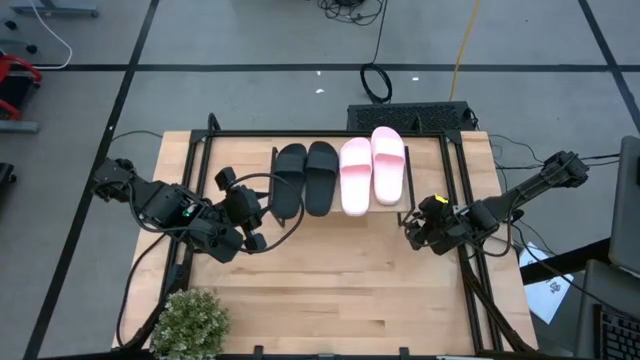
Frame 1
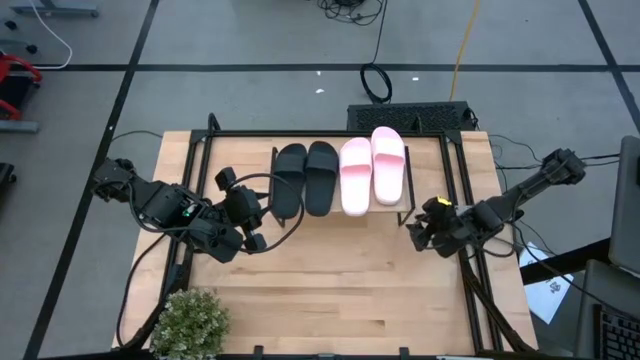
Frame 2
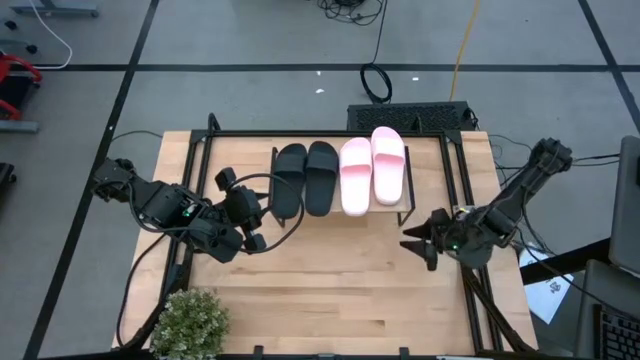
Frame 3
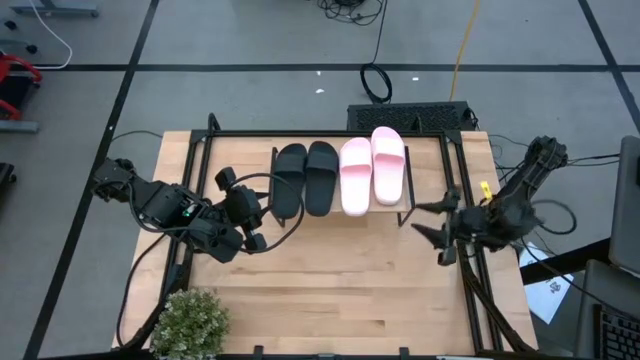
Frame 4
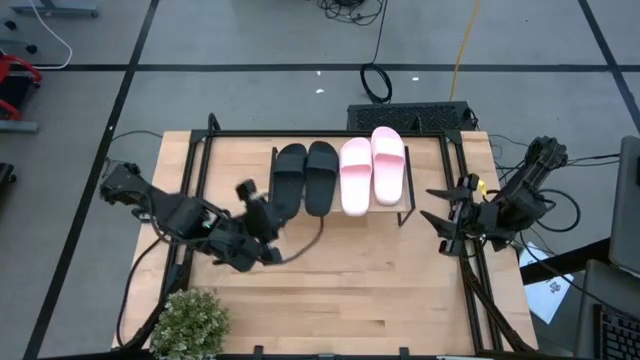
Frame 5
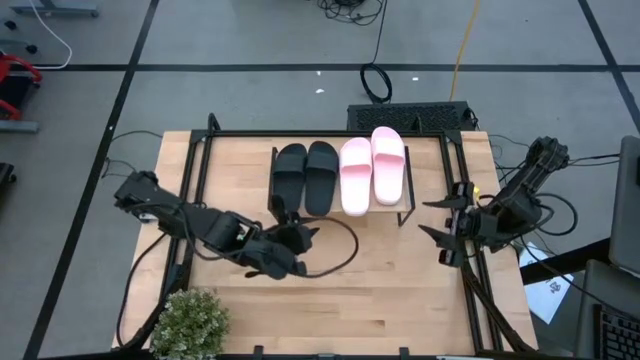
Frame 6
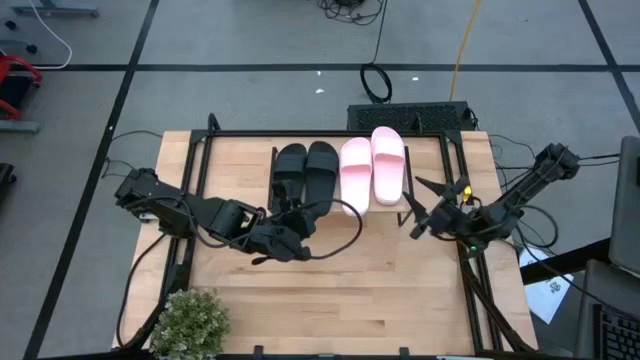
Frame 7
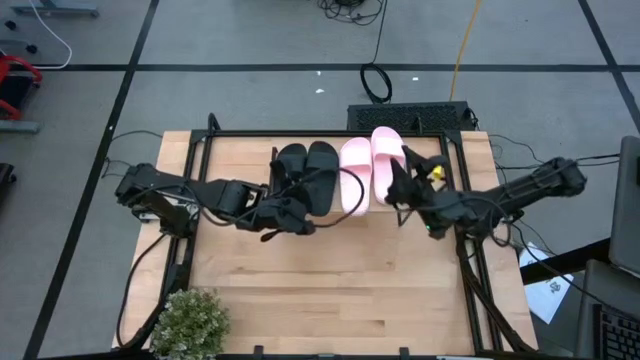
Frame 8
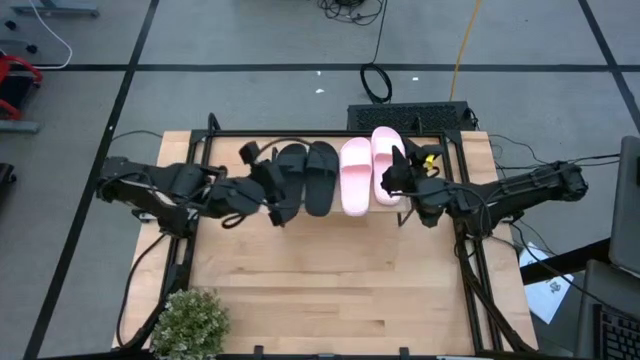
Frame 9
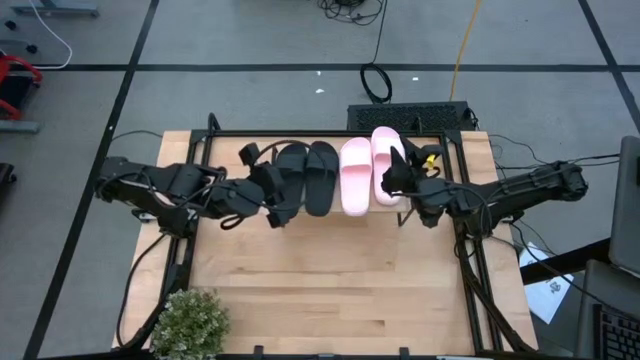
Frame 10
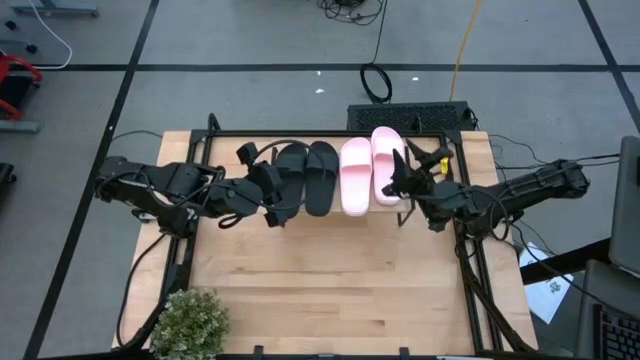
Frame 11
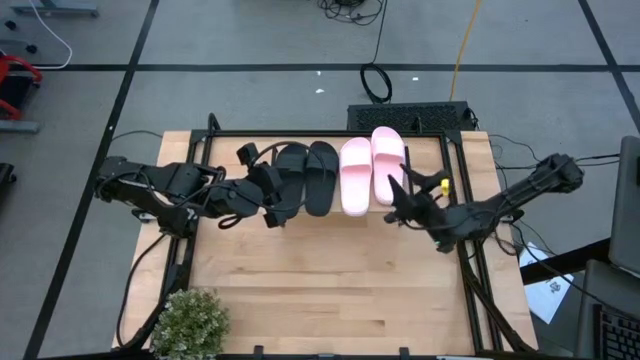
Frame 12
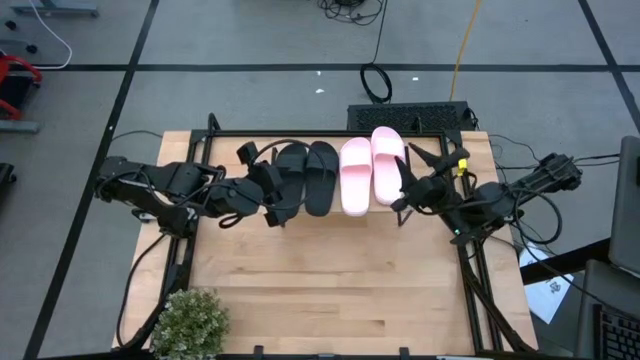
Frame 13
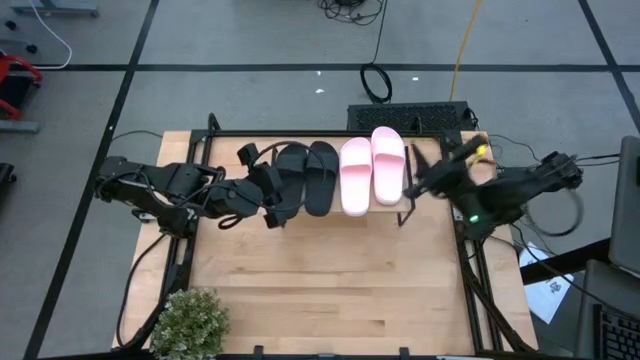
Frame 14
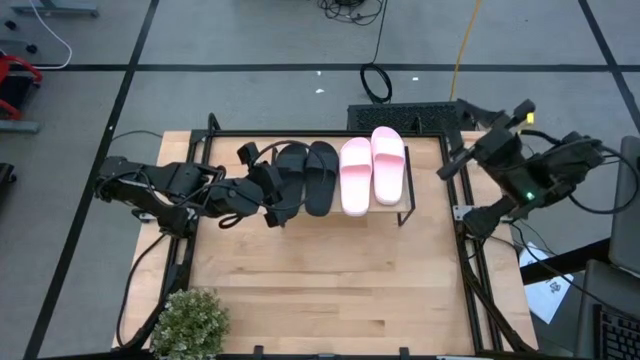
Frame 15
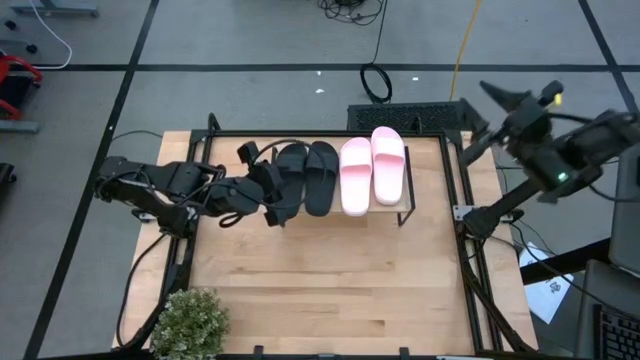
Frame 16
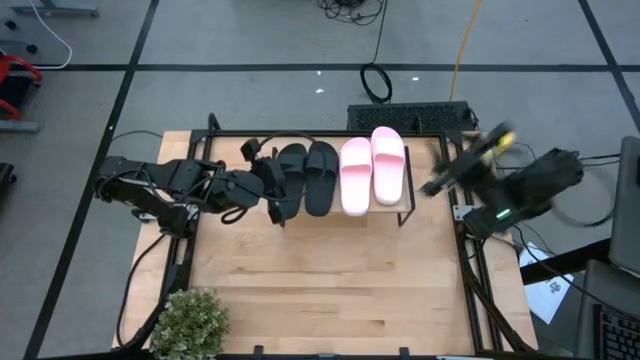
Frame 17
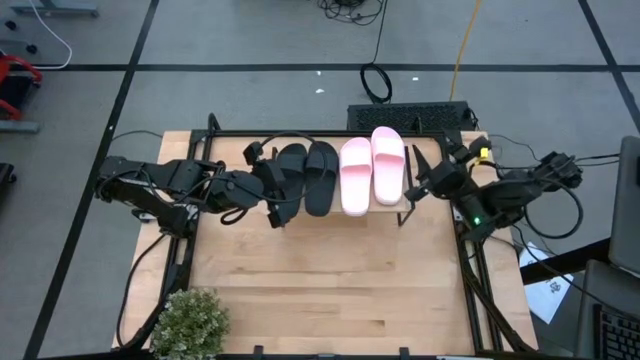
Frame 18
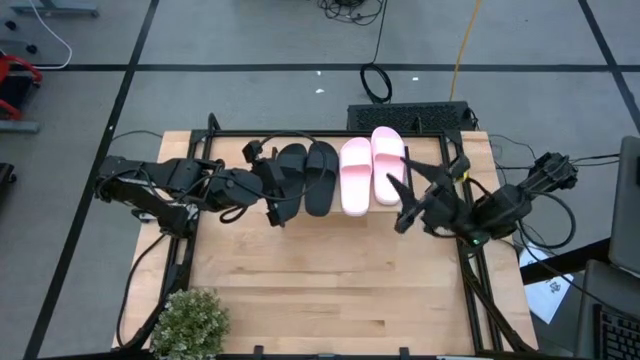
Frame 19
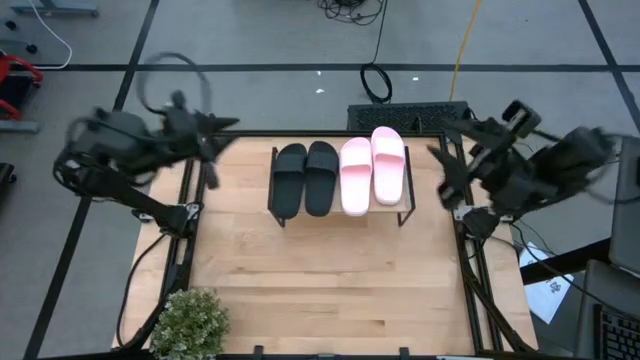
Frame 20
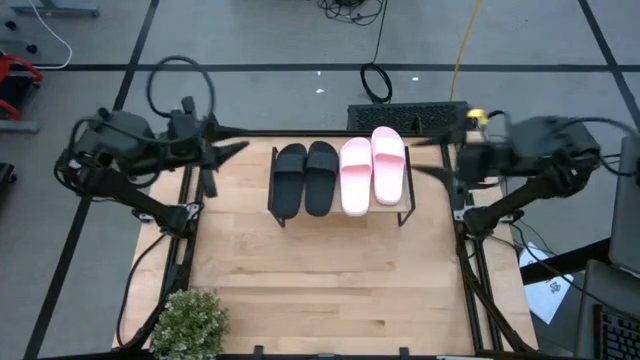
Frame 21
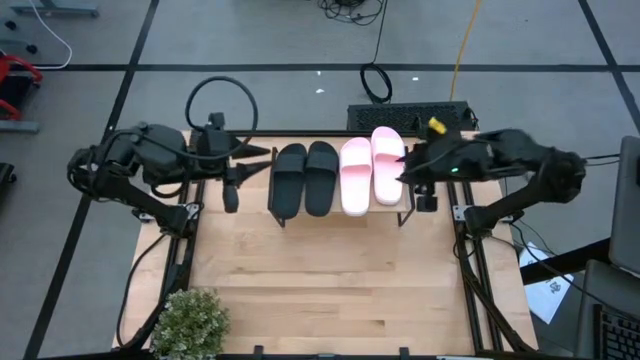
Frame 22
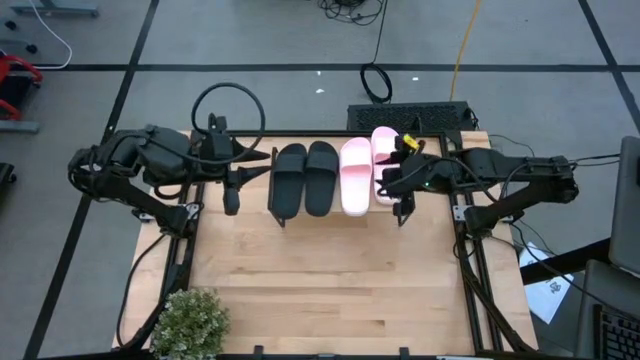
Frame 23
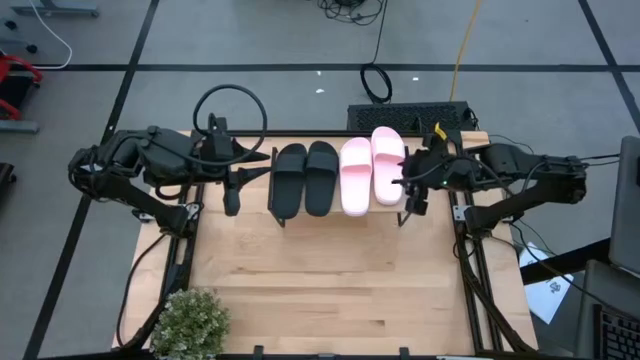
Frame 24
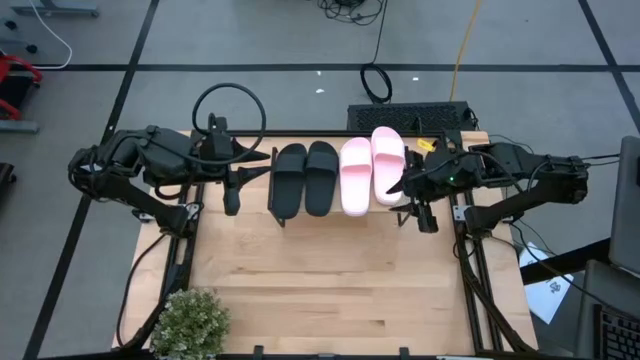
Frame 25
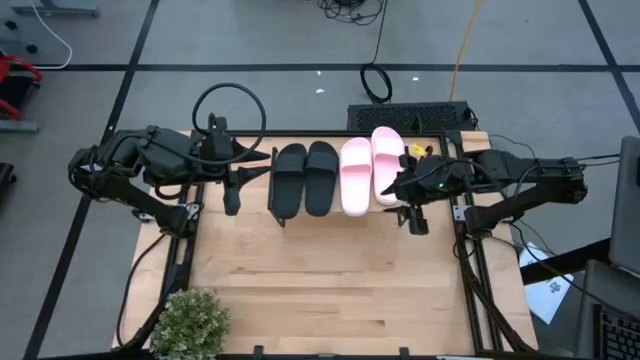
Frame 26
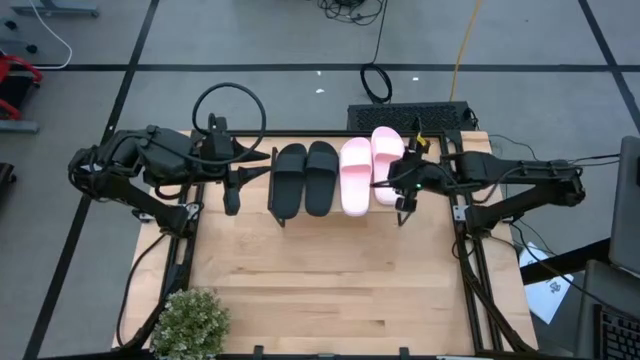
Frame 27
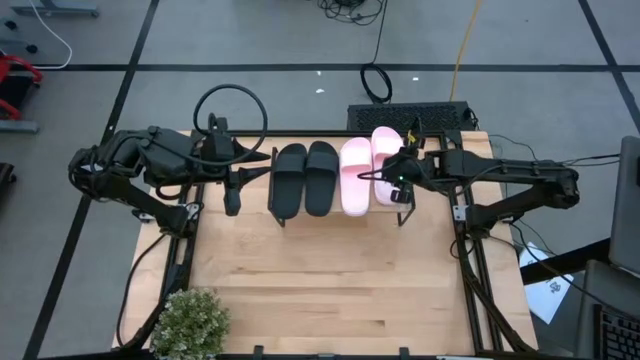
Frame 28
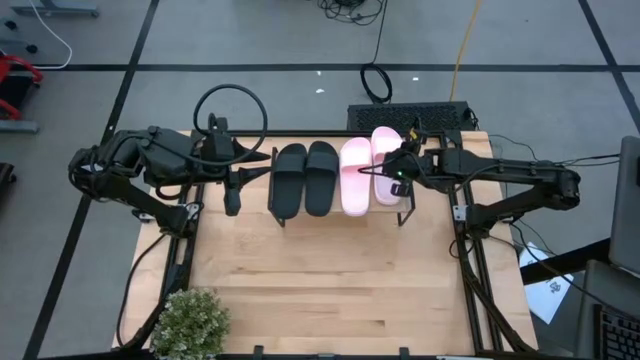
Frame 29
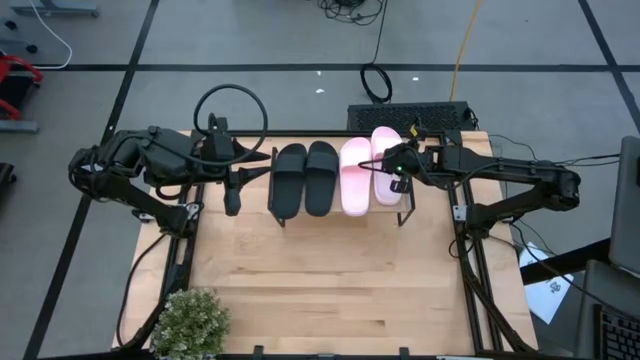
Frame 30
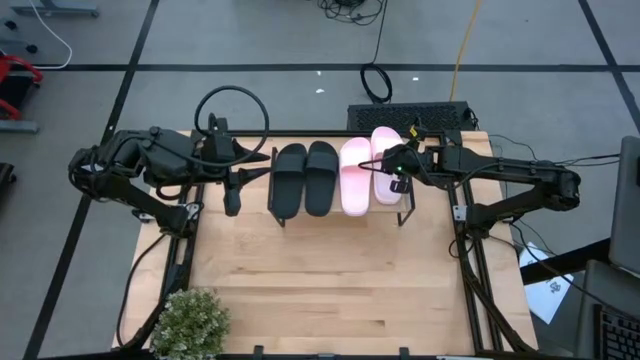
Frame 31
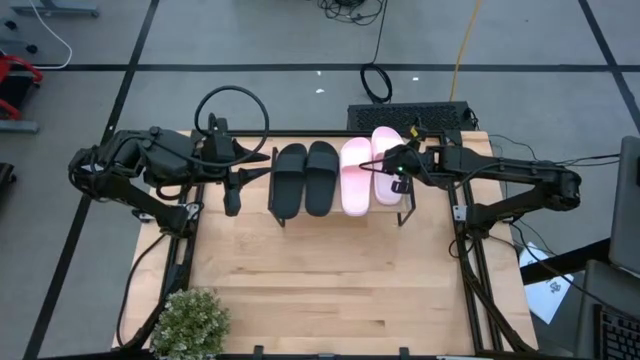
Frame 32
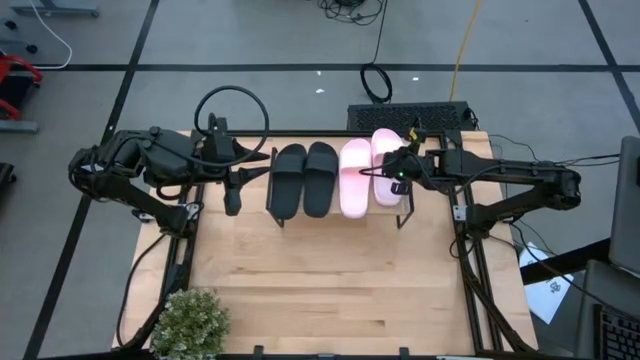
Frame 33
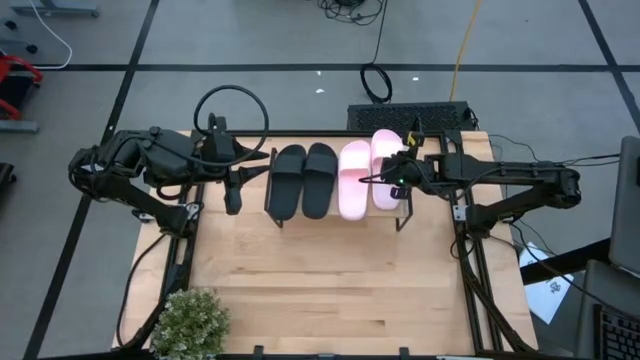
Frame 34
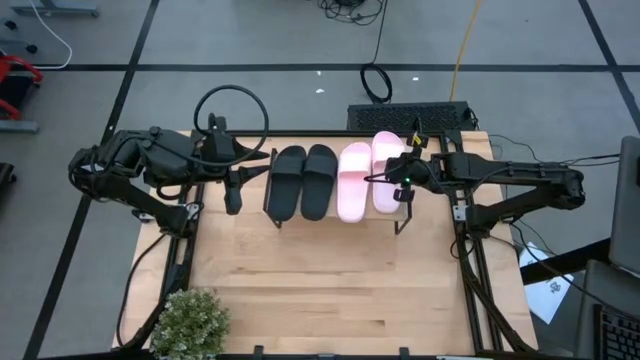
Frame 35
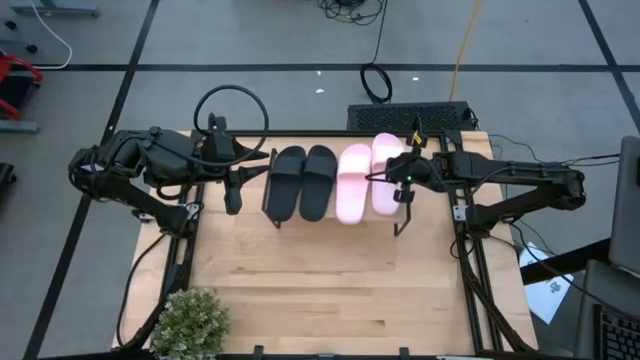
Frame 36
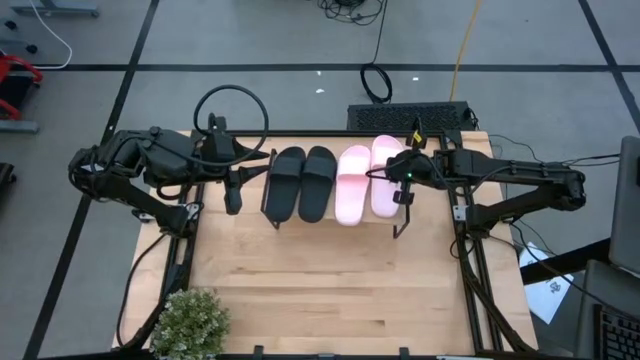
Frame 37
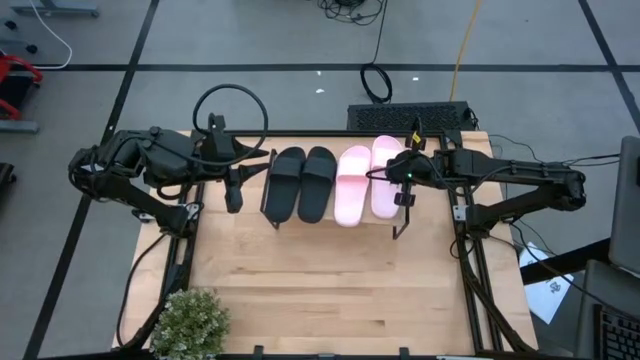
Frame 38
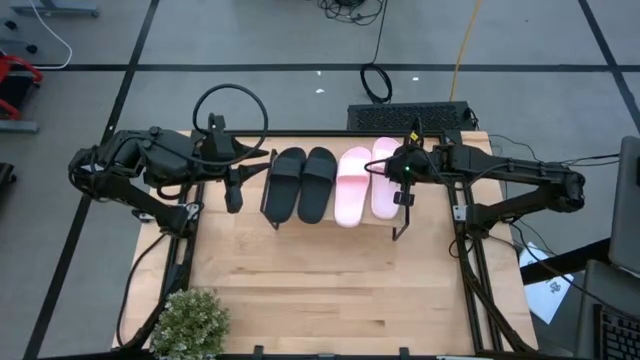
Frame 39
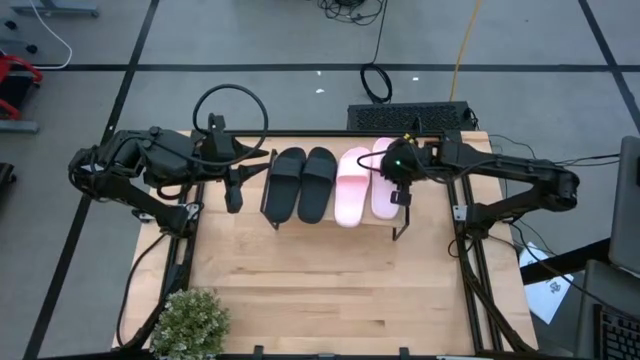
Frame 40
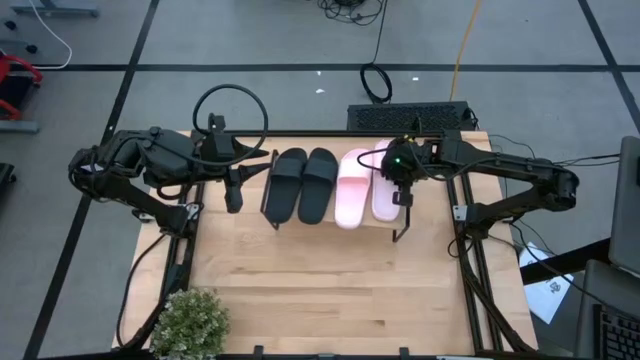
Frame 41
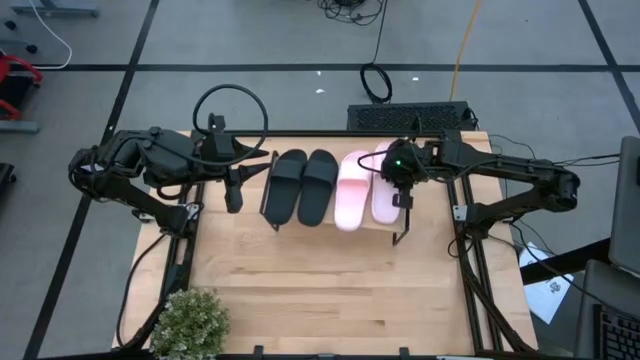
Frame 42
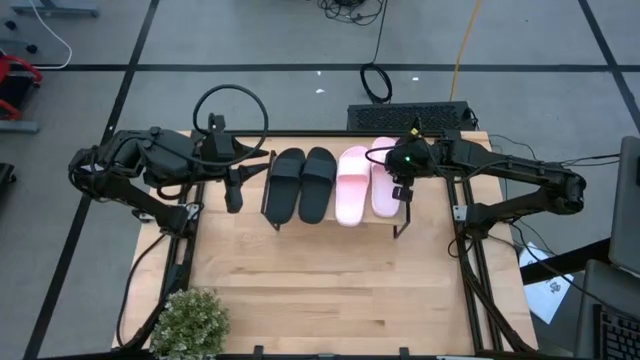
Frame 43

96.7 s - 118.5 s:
Task: Pick and place slides into the shelf
Adjust the right pink slide on the shelf
